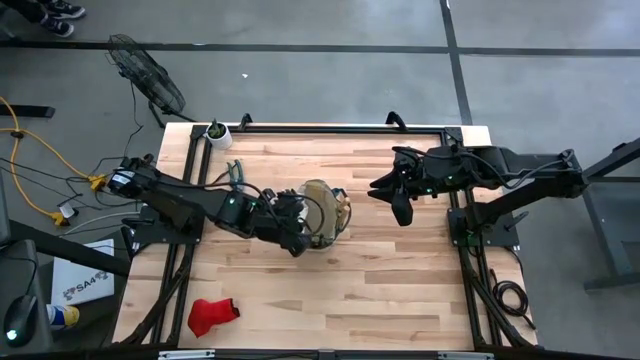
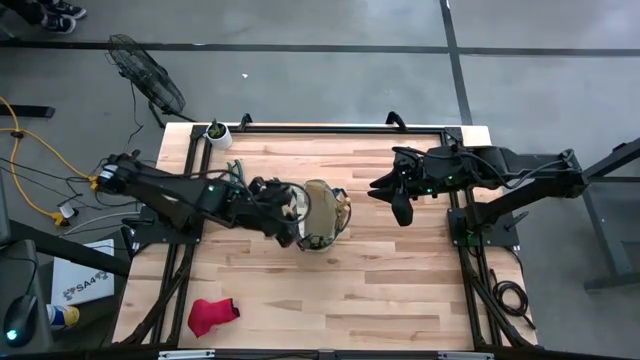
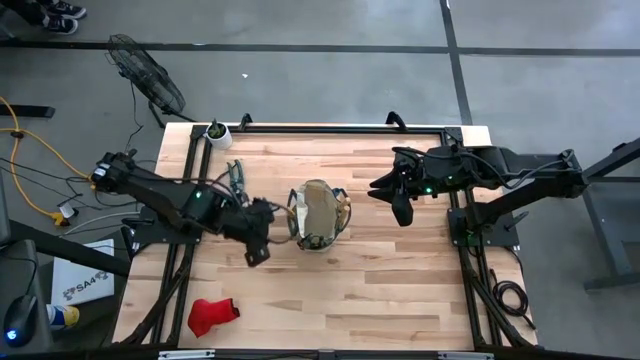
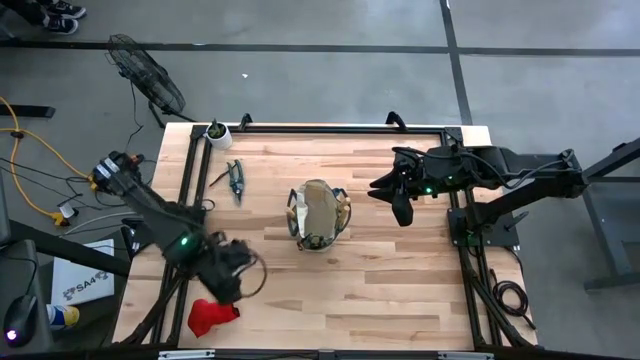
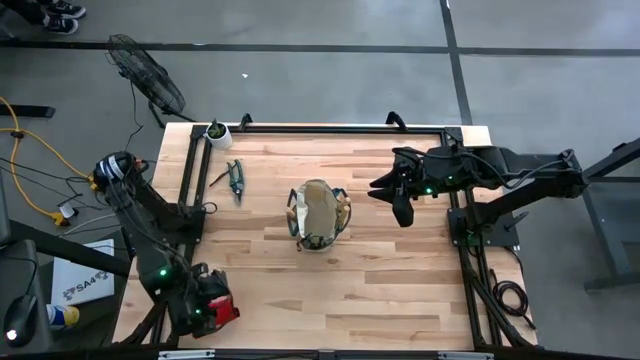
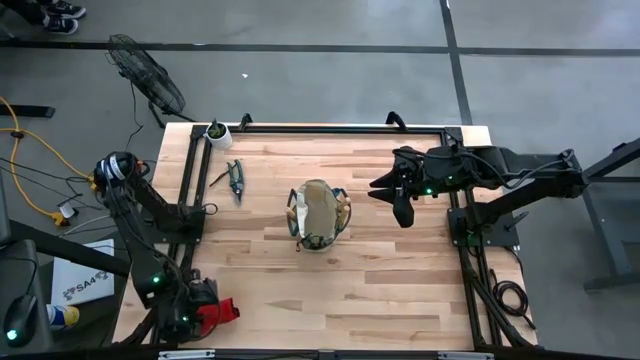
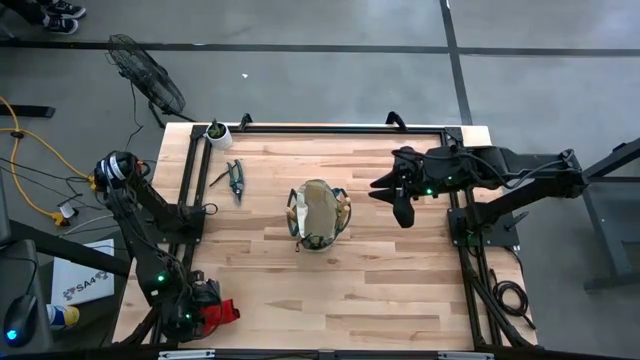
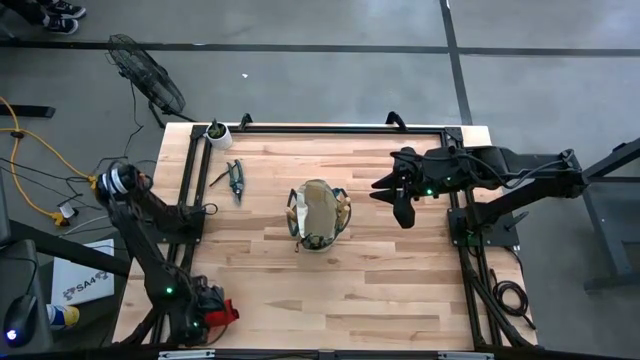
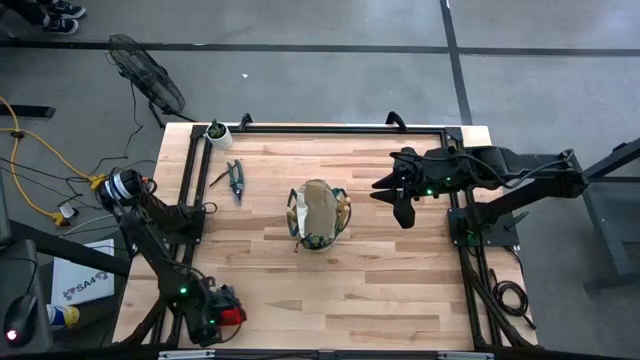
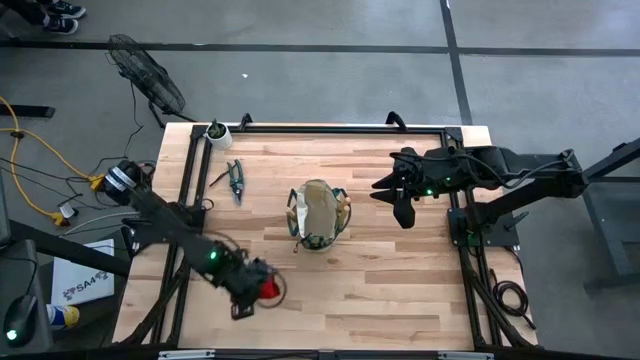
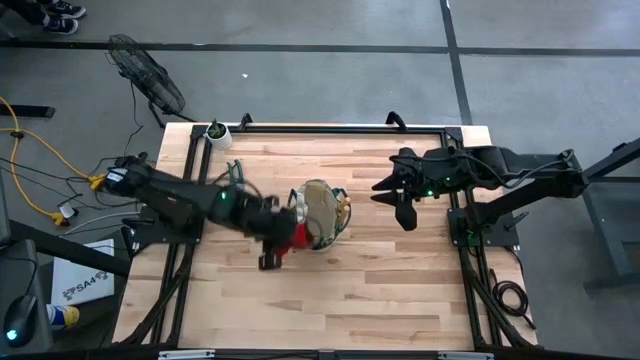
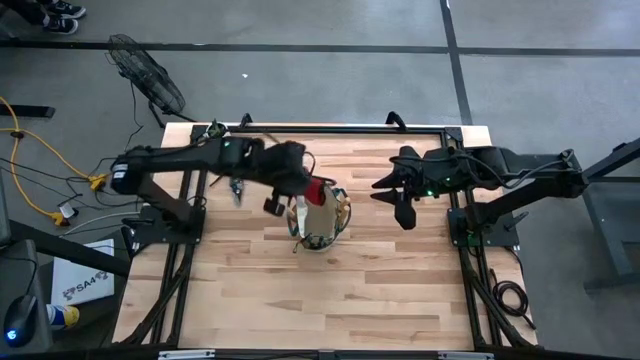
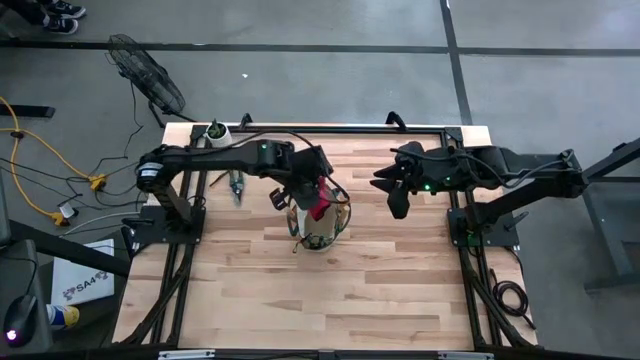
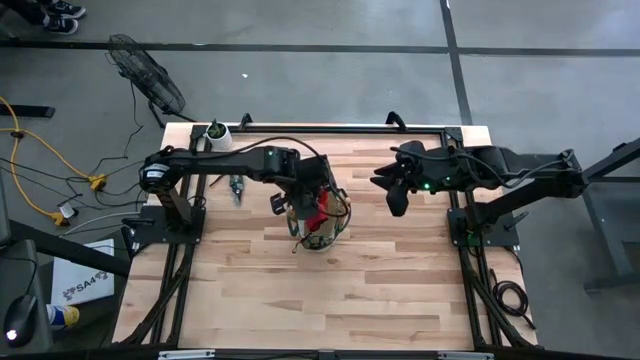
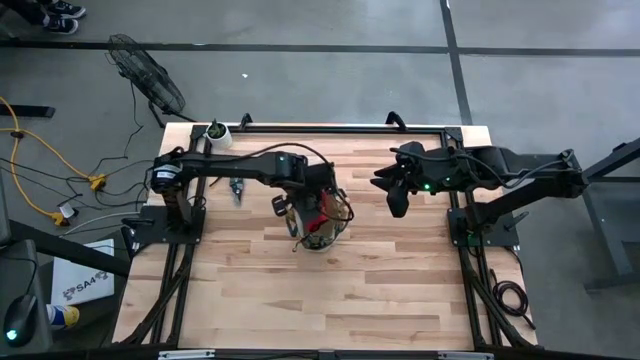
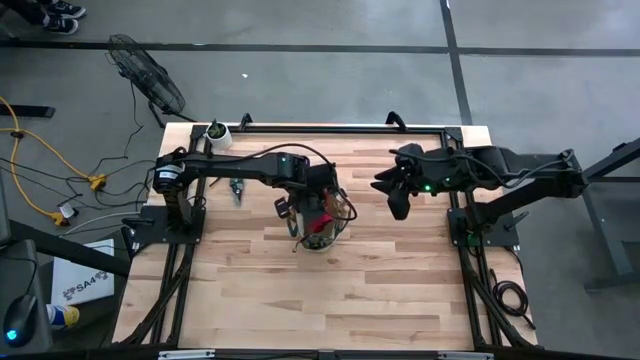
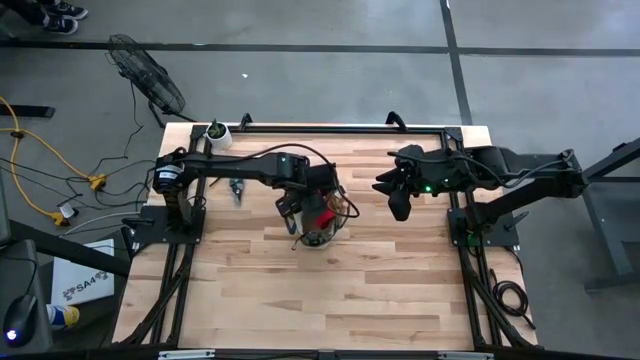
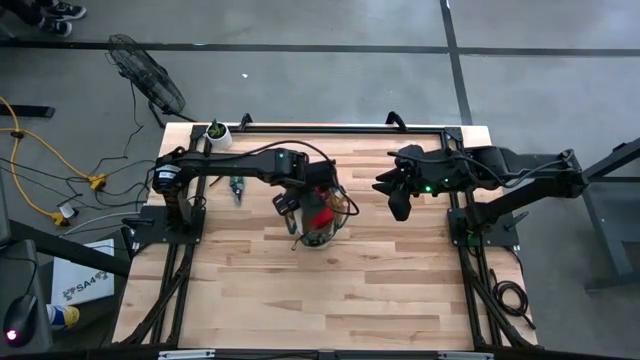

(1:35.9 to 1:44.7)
Task: Pick & Place Garden tools in Gardening bag
Put the red gloves into the gardening bag

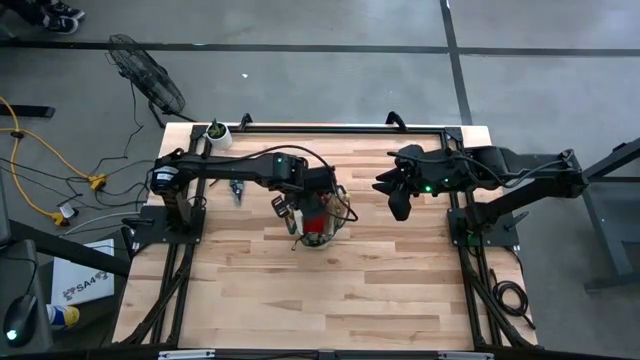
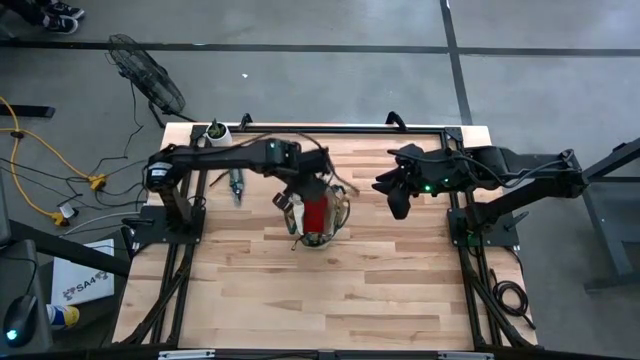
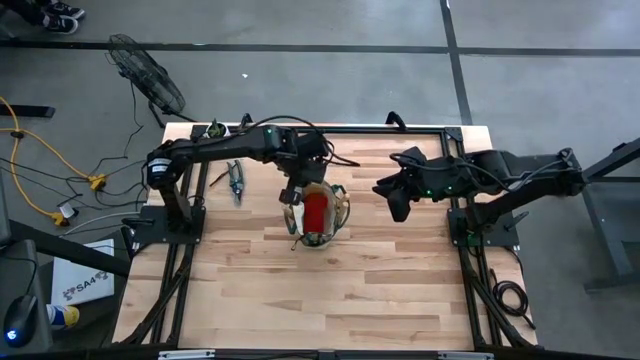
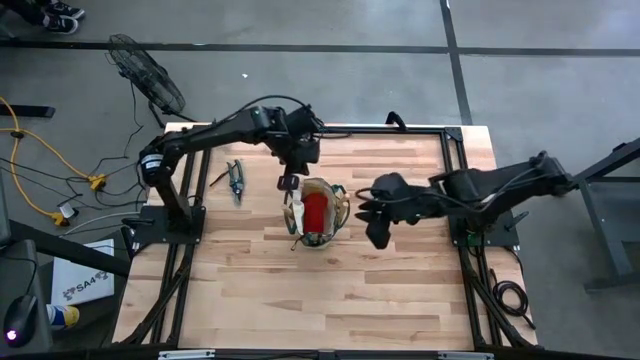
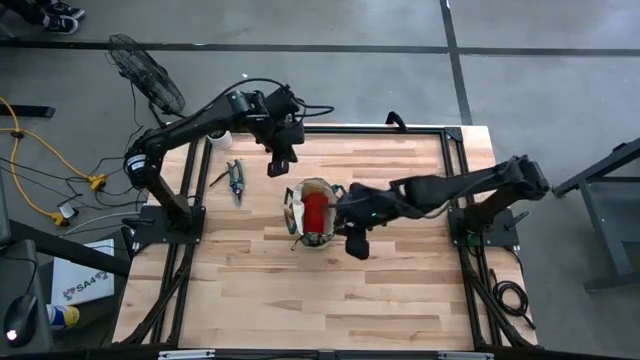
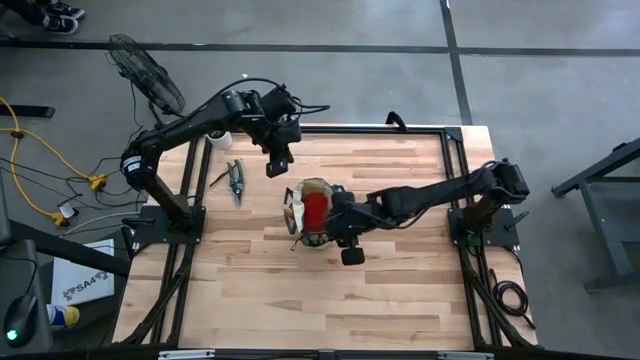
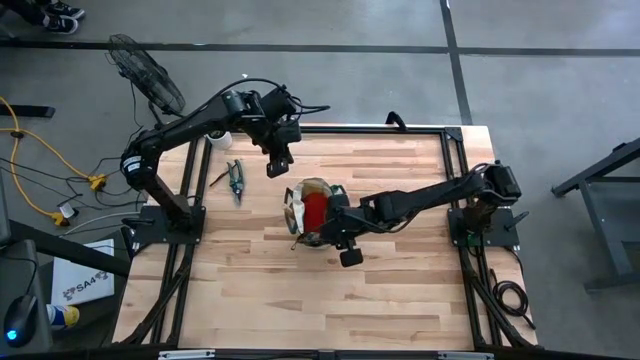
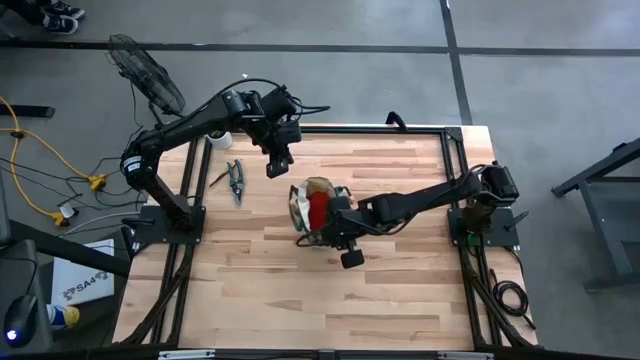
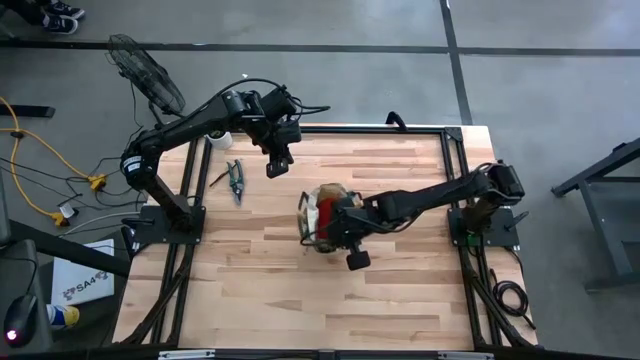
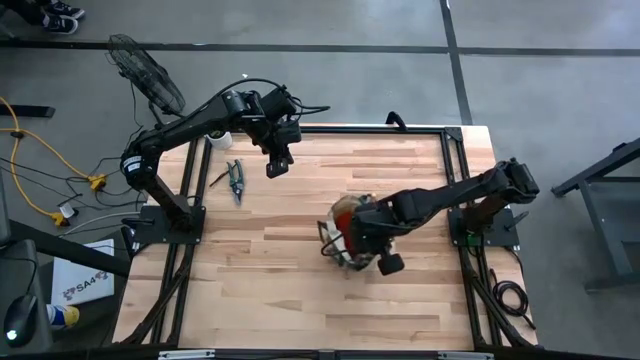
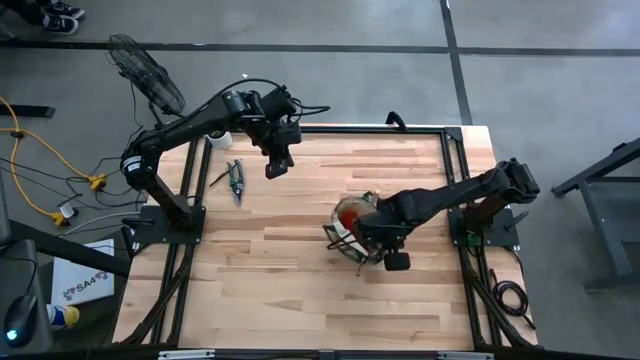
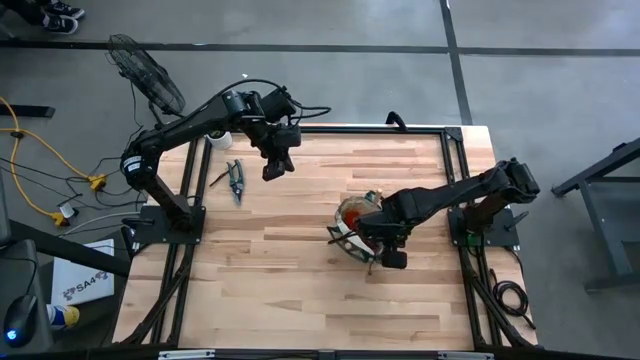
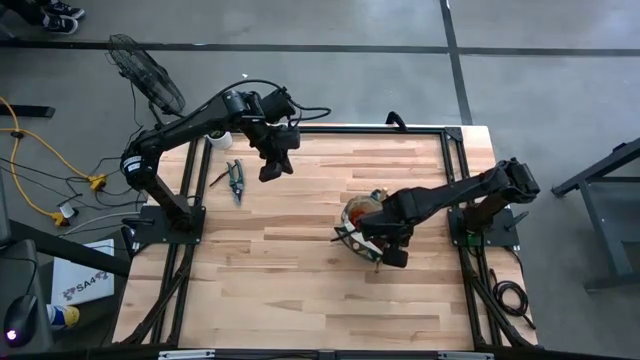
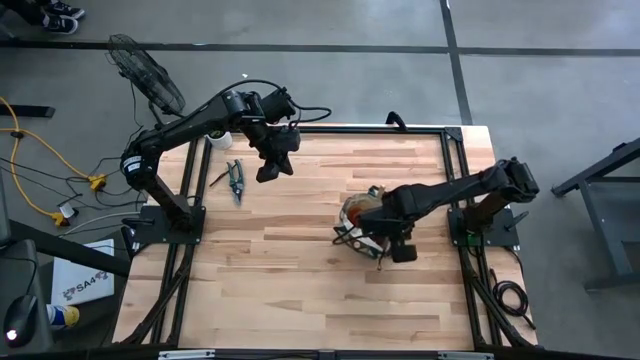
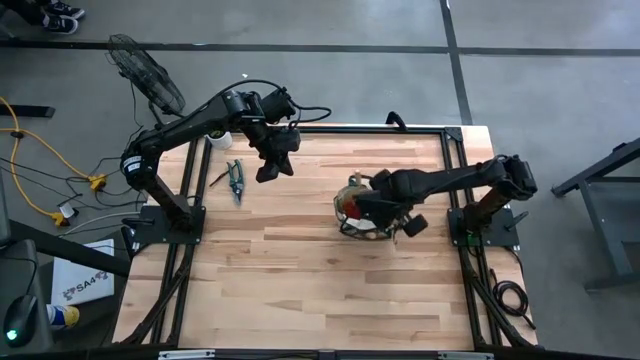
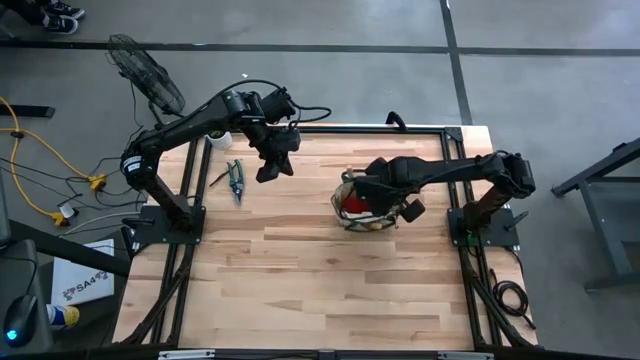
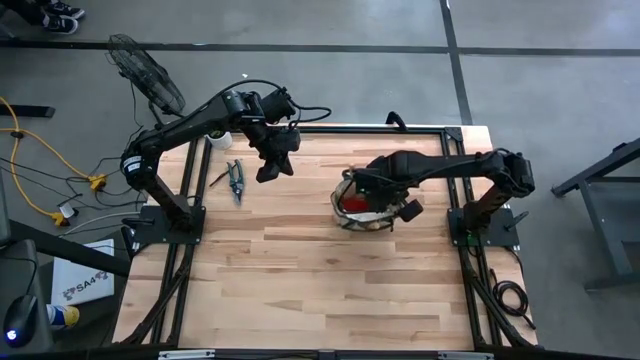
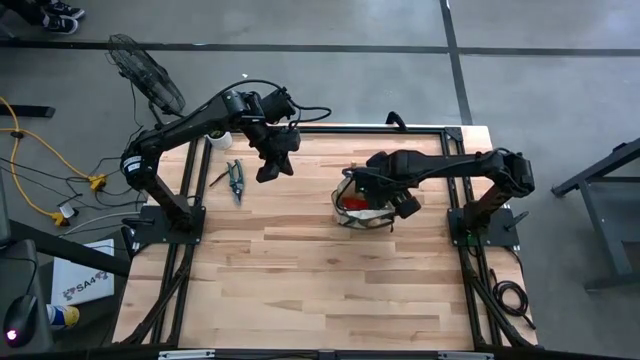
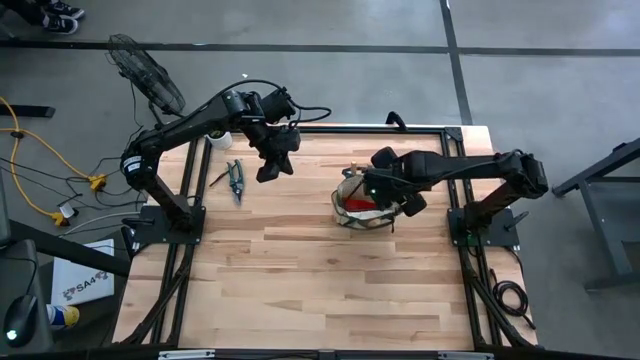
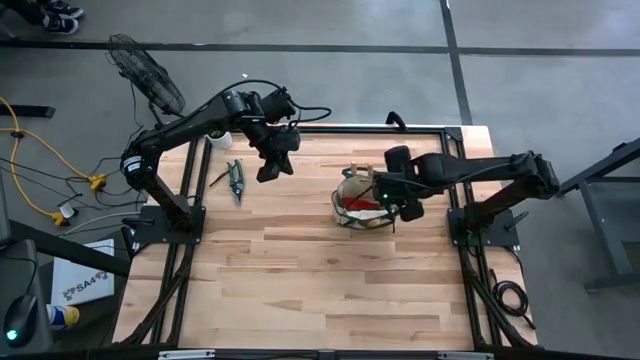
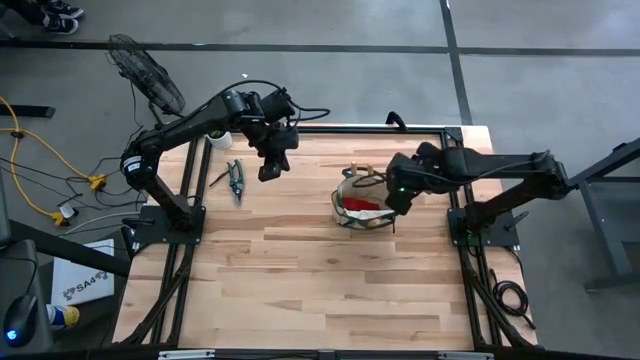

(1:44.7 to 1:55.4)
Adjust the gardening bag
